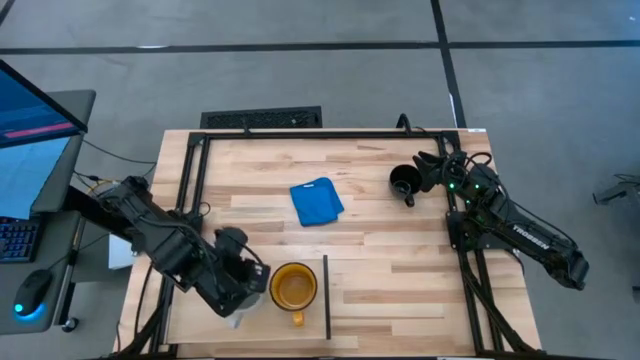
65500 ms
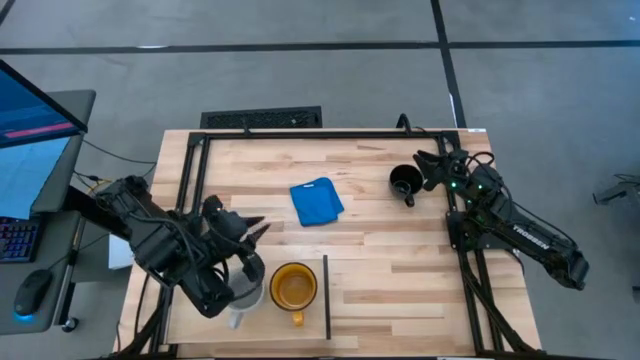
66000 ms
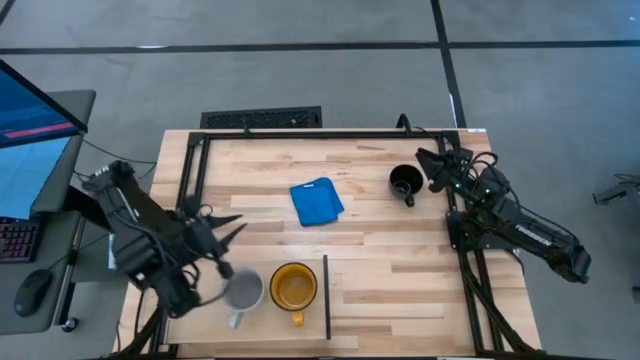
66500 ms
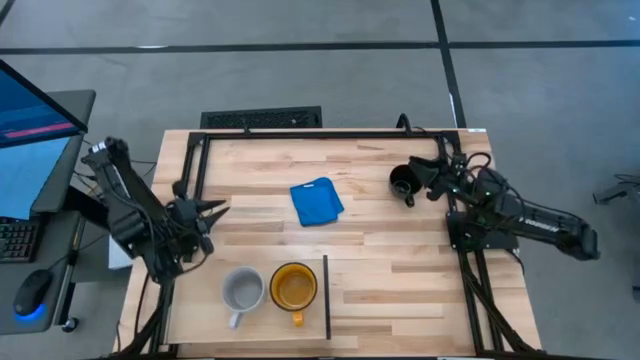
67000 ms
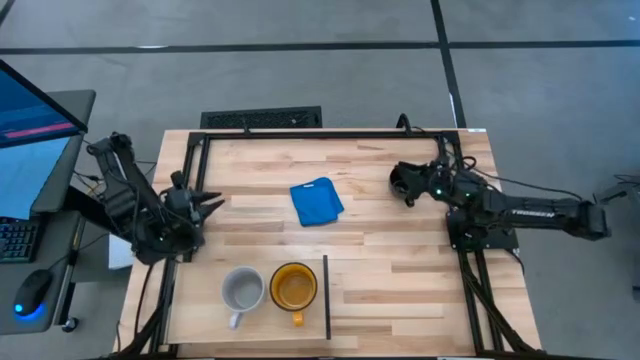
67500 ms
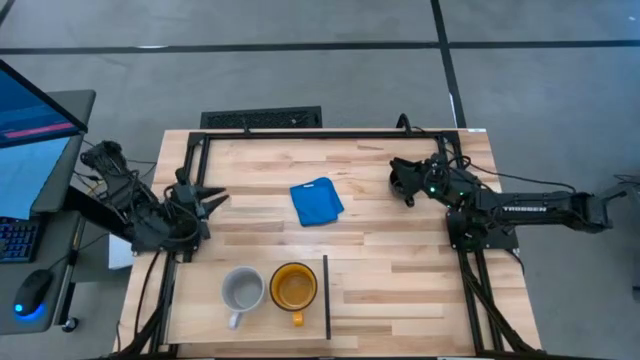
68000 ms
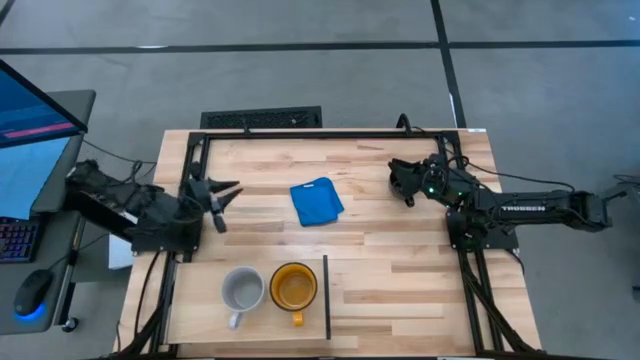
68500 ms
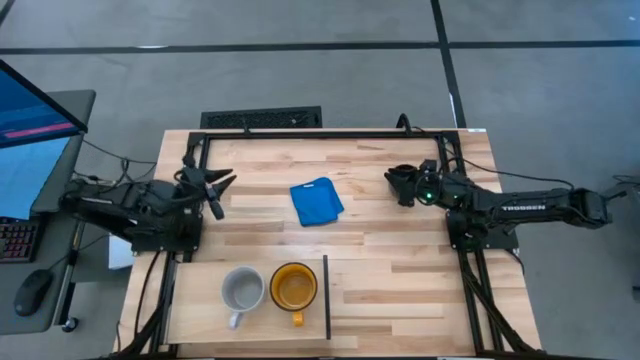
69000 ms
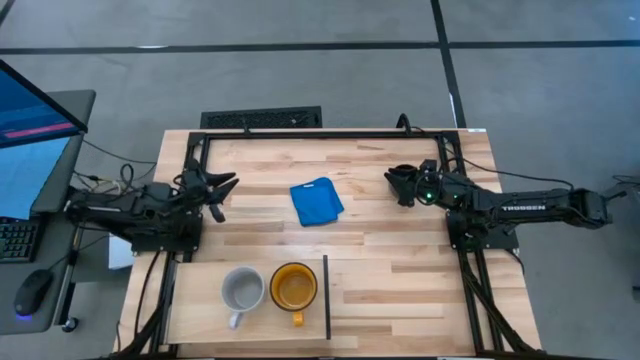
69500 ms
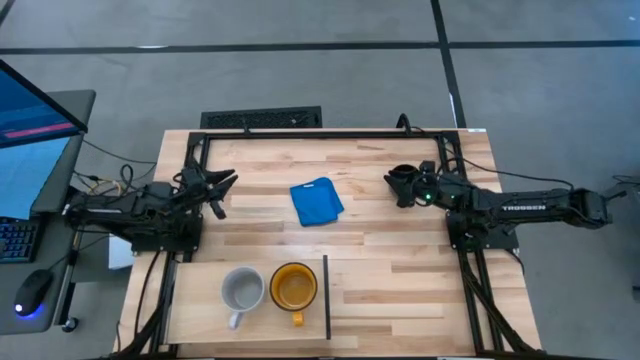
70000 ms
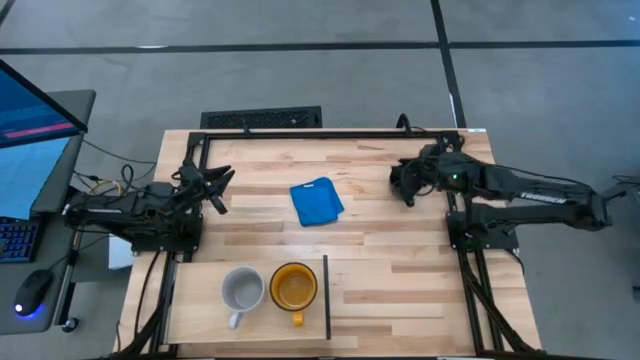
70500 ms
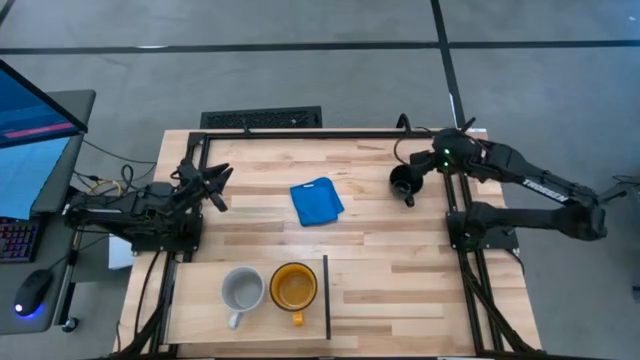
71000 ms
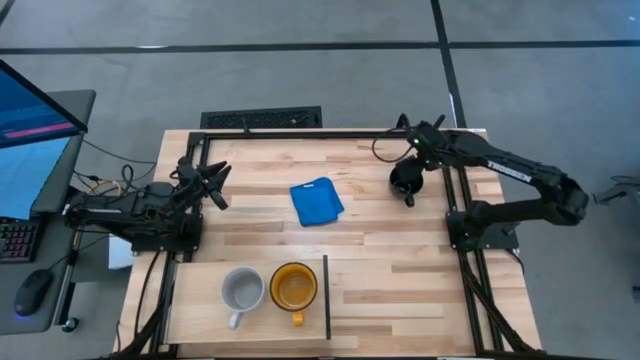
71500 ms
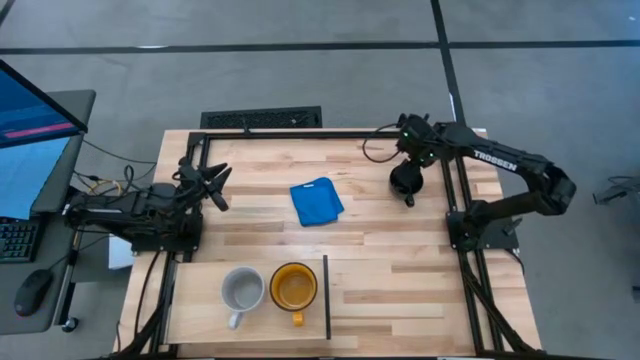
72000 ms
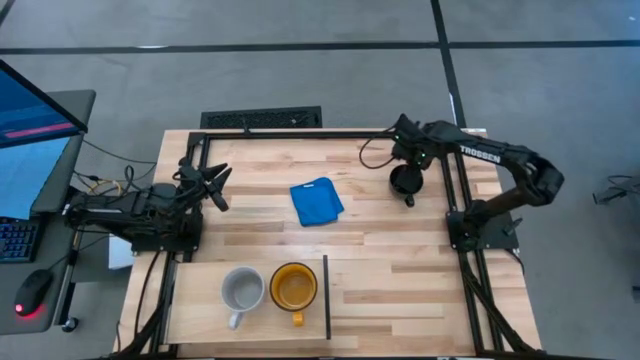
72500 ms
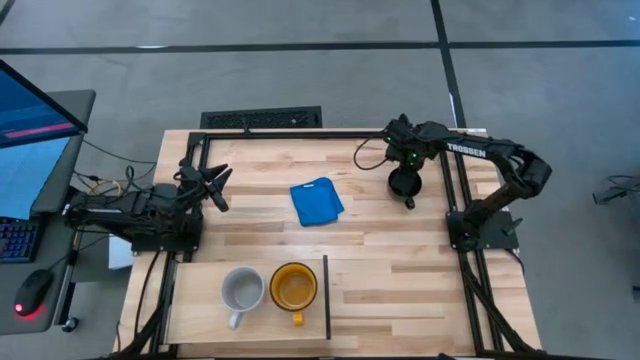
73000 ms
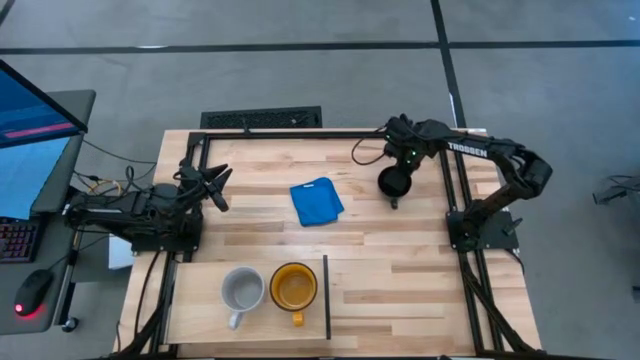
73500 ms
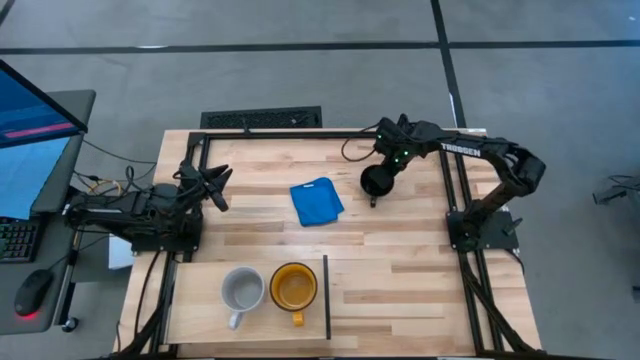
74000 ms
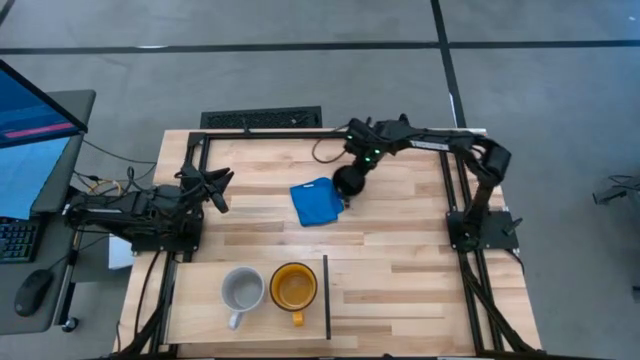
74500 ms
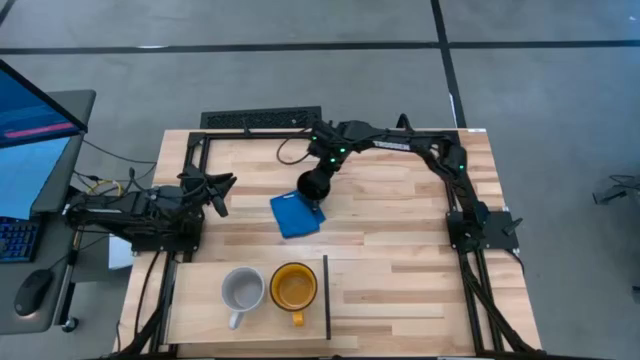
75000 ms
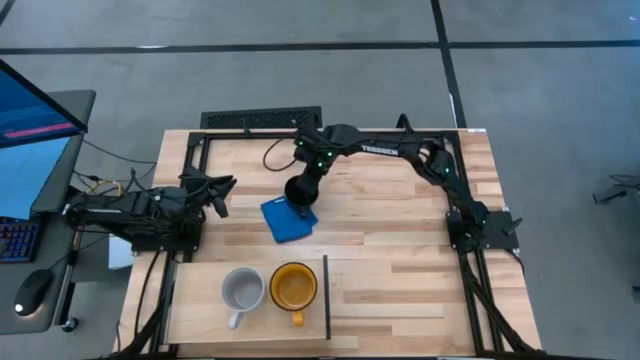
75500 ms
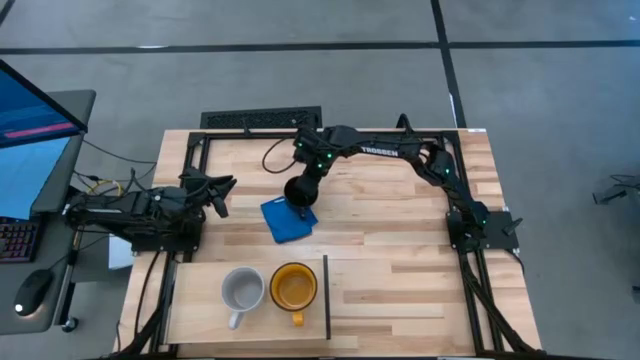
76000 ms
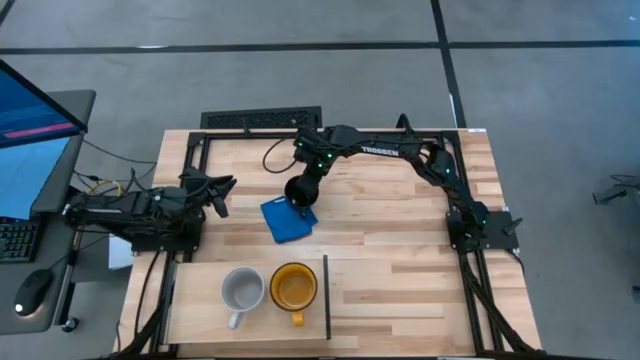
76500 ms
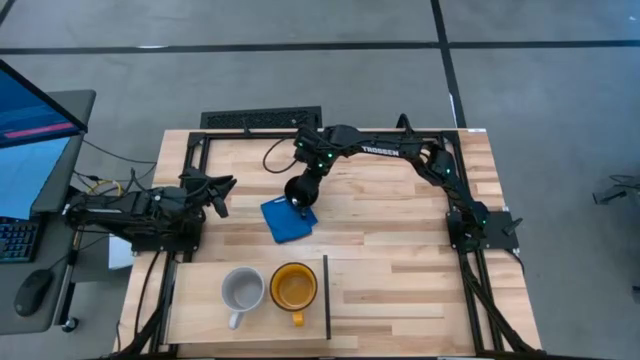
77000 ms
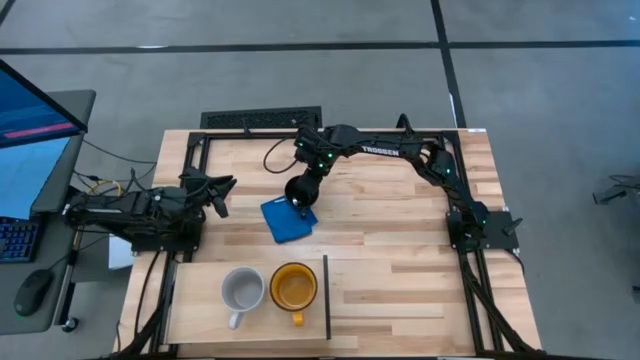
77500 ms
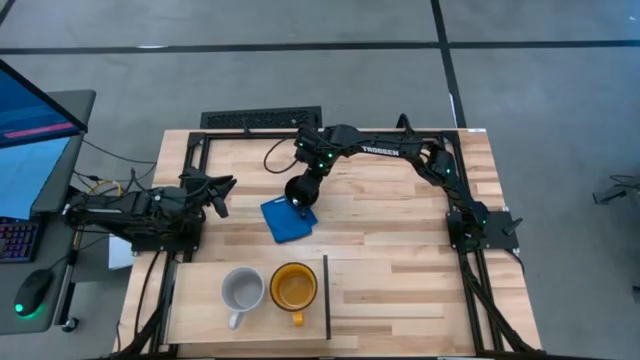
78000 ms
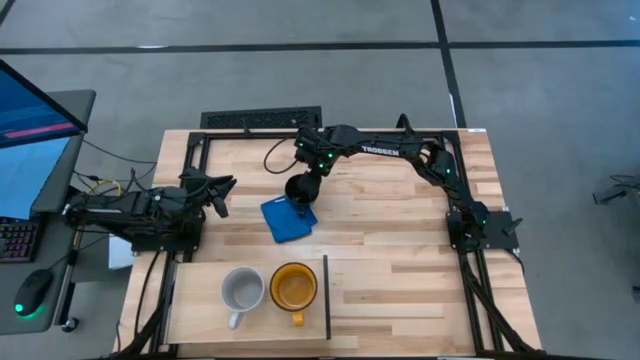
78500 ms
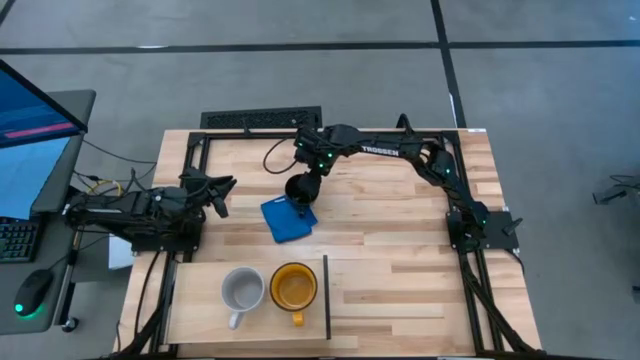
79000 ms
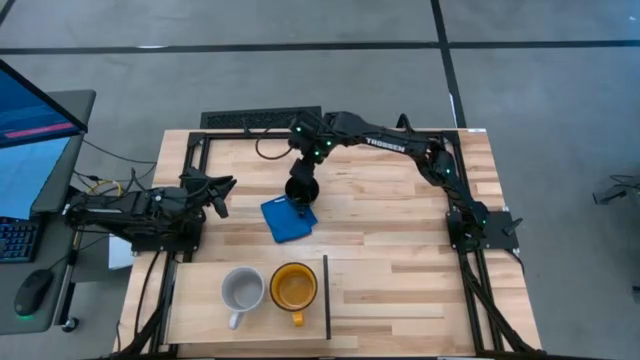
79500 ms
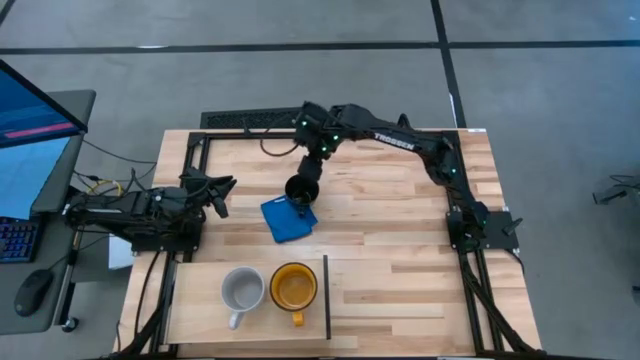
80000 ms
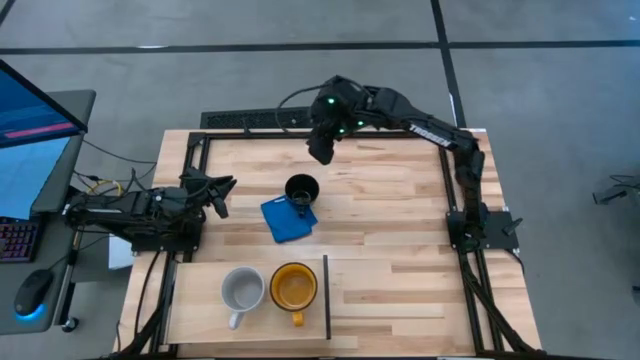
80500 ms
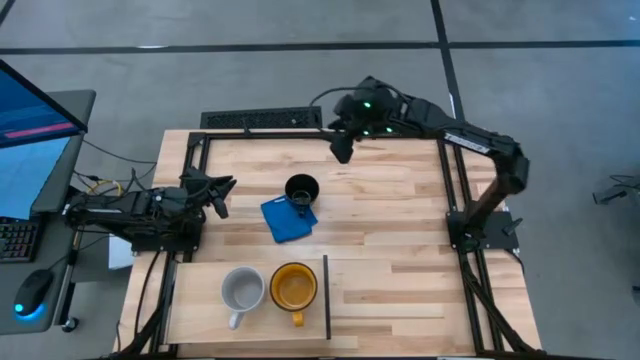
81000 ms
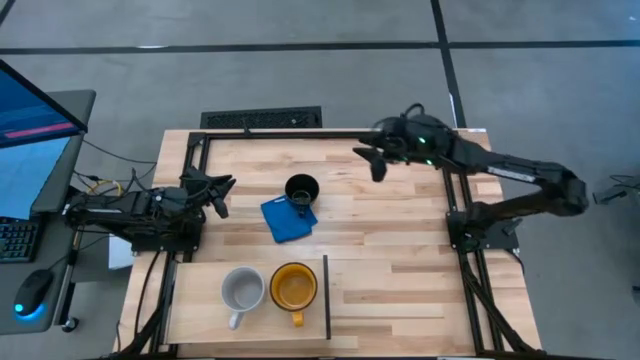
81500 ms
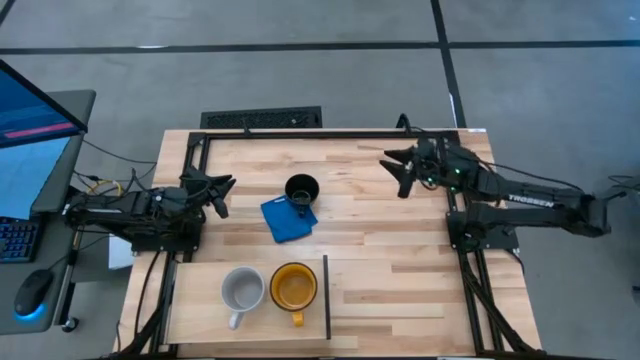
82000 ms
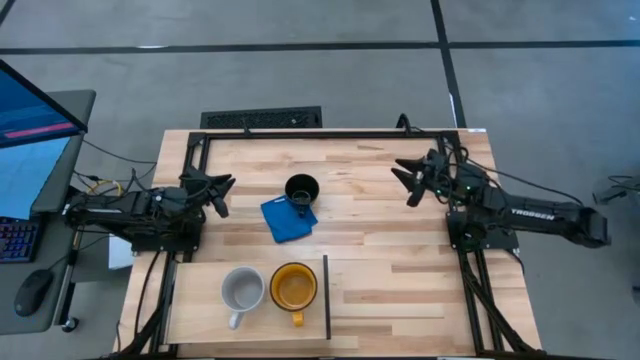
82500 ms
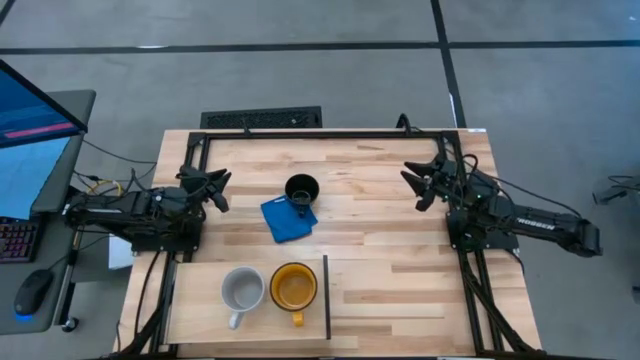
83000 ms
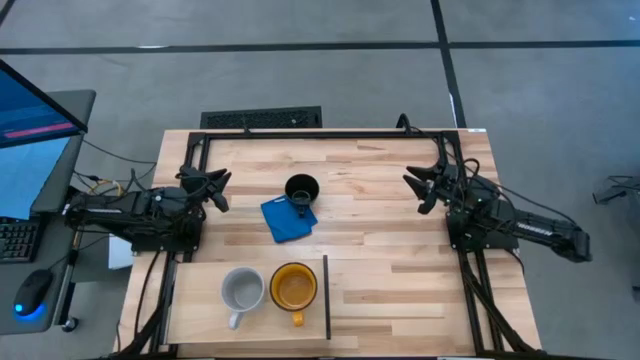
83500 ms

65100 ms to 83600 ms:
Task: Stack small to large cups/mugs on shelf
Put the black mug on the shelf

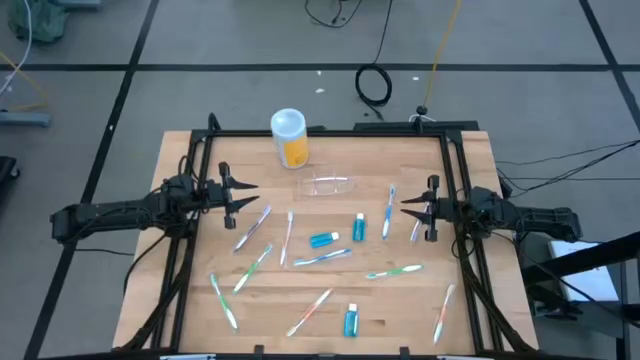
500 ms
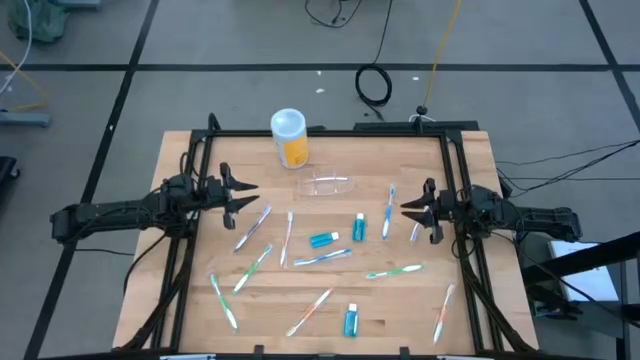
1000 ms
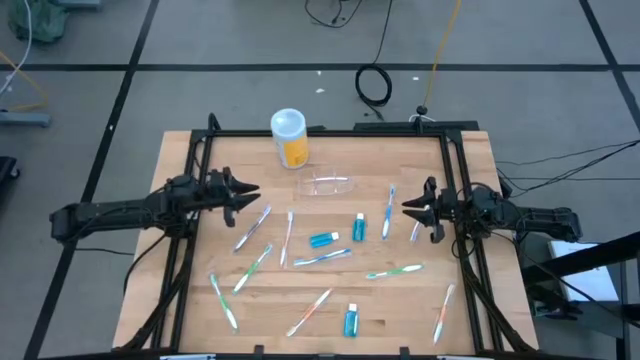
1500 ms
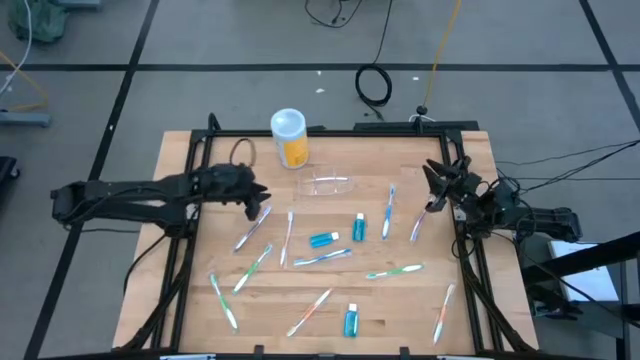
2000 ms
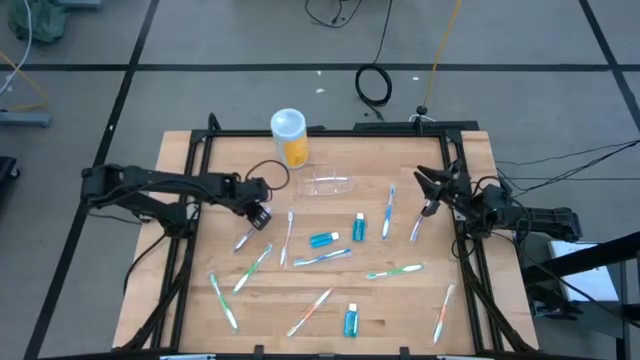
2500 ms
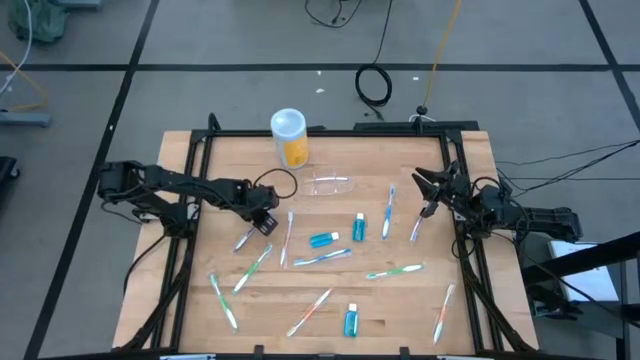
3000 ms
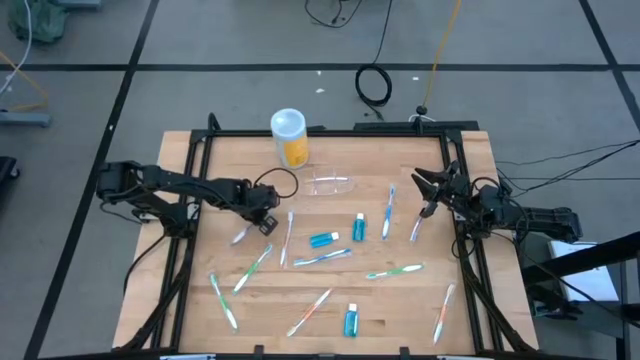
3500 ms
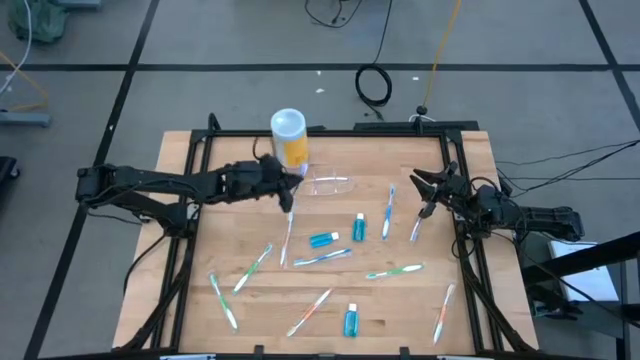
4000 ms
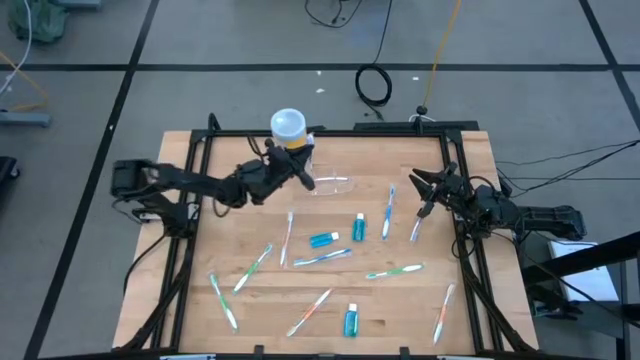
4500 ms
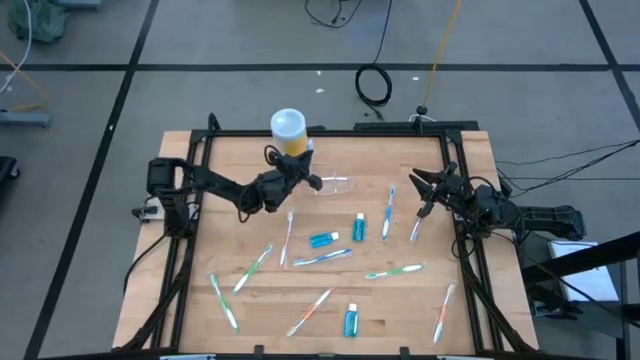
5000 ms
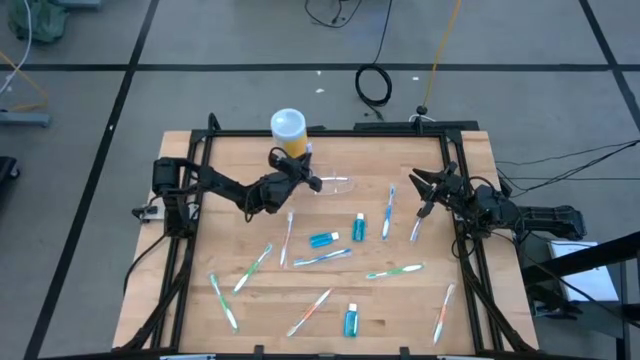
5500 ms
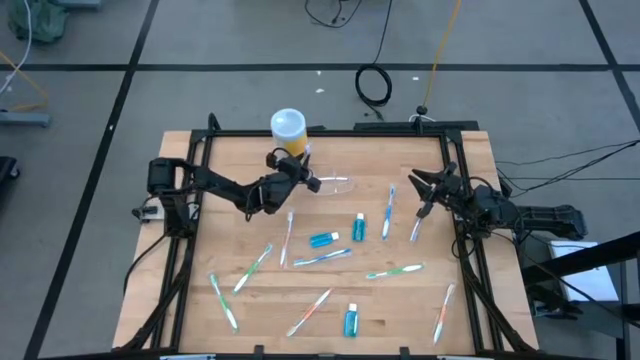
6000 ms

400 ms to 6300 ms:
Task: Pick & Place toothbrushing station
Put the left purple toothbrush into the transparent organizer
